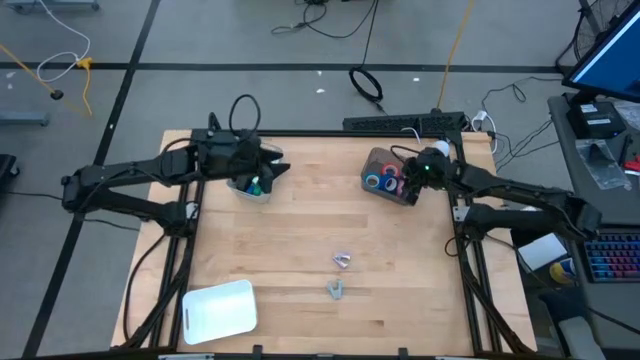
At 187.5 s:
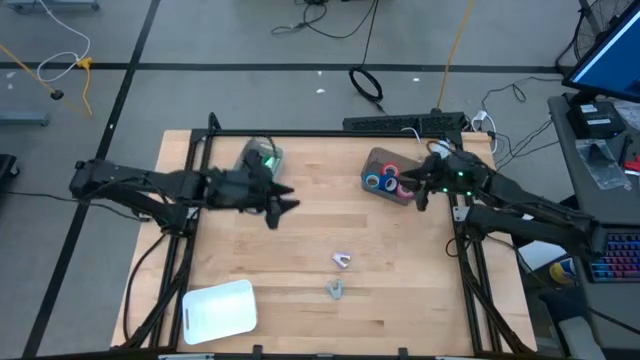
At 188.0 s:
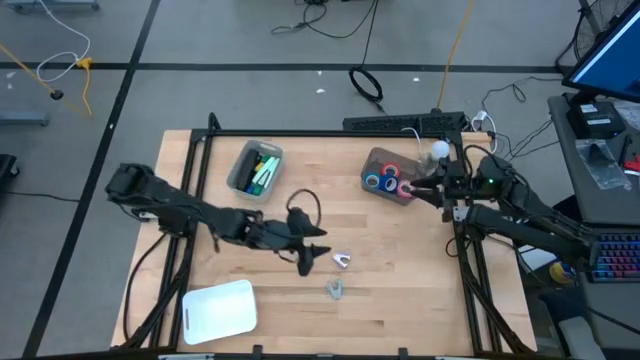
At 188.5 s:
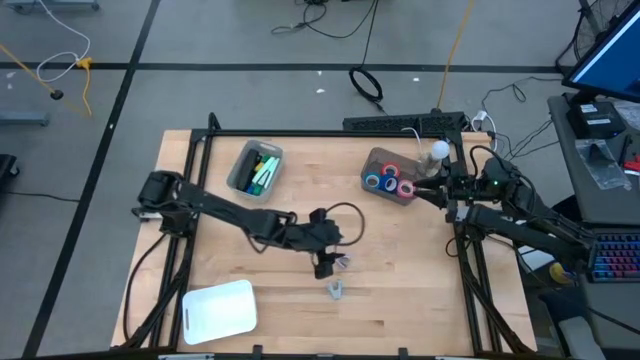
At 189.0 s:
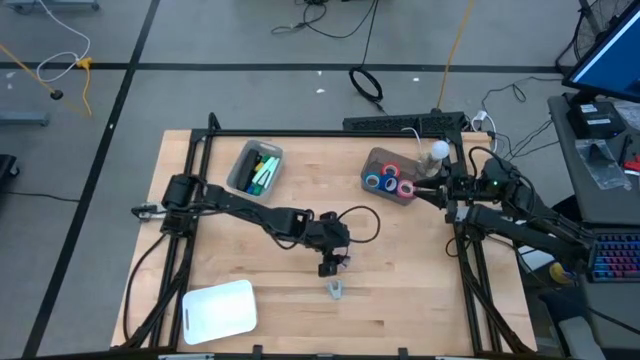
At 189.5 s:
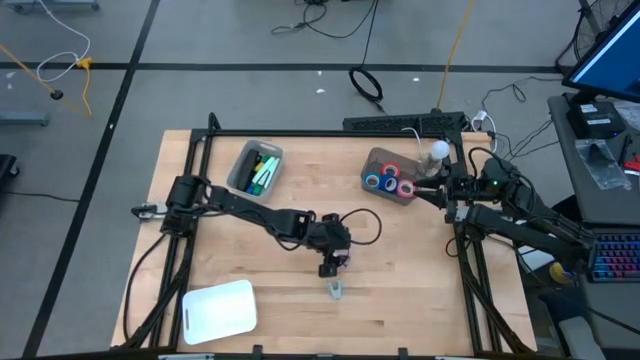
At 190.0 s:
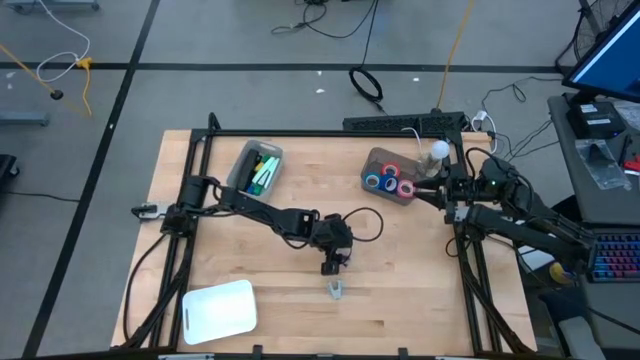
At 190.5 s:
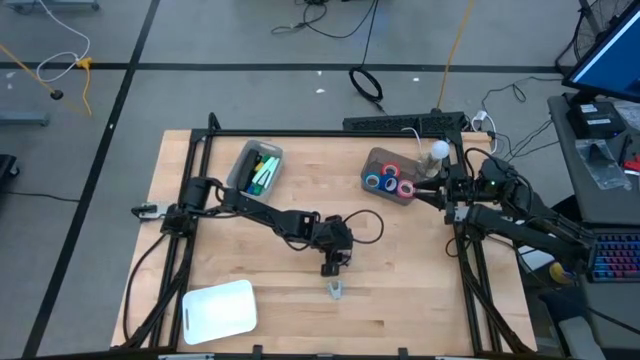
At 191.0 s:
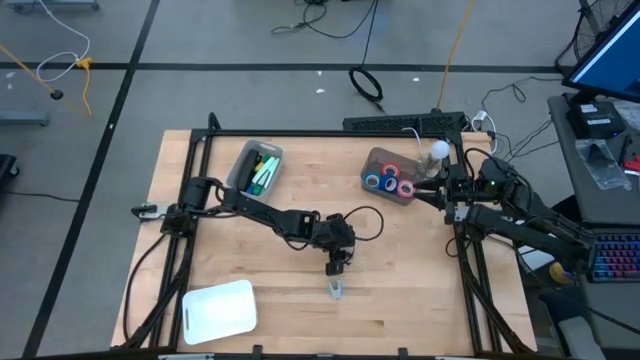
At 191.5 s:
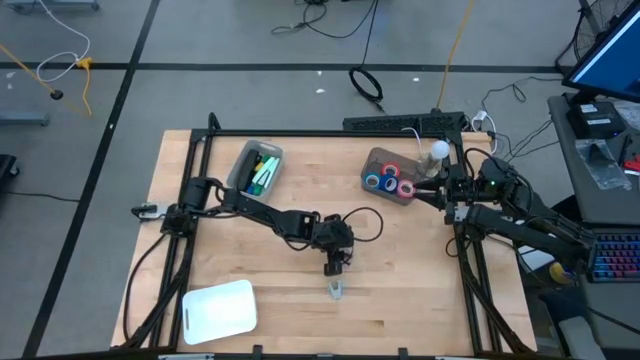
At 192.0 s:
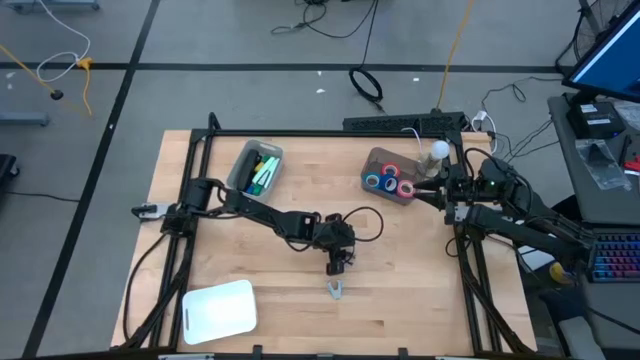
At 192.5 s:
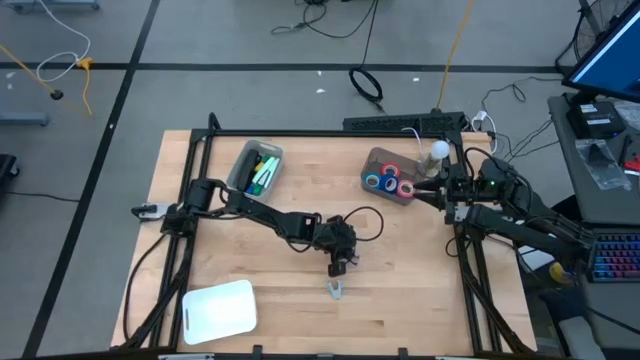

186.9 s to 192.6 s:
Task: Pick and place Stapler, Stapler remover, tape
Put the purple staple remover into the white bin

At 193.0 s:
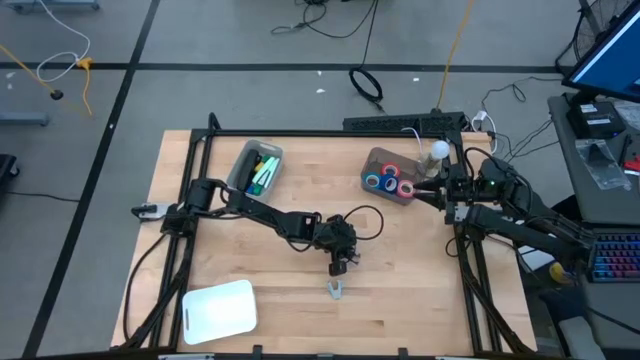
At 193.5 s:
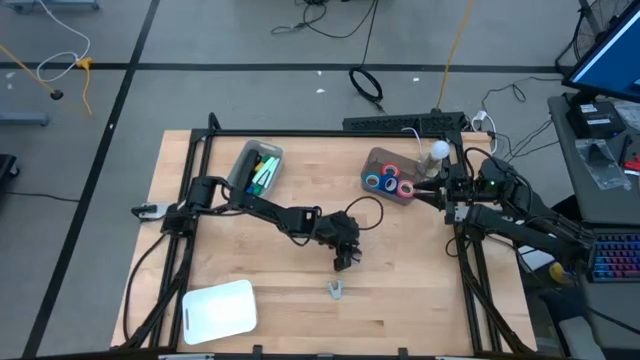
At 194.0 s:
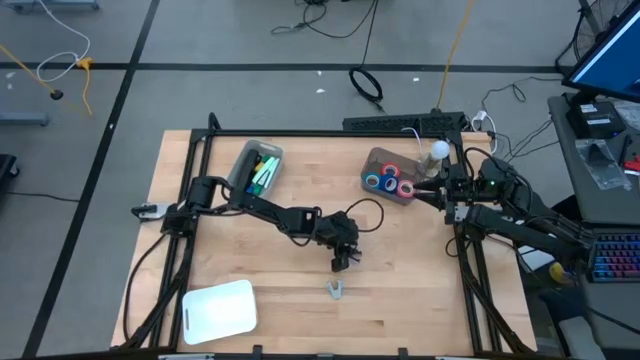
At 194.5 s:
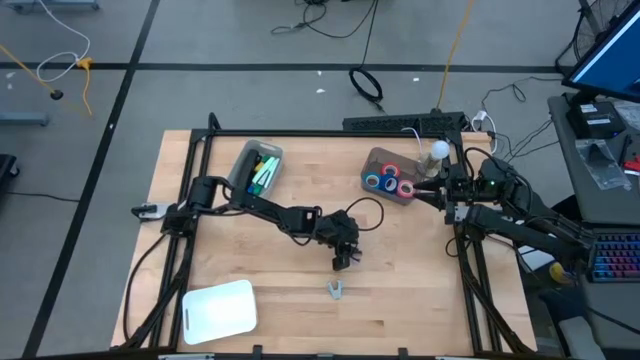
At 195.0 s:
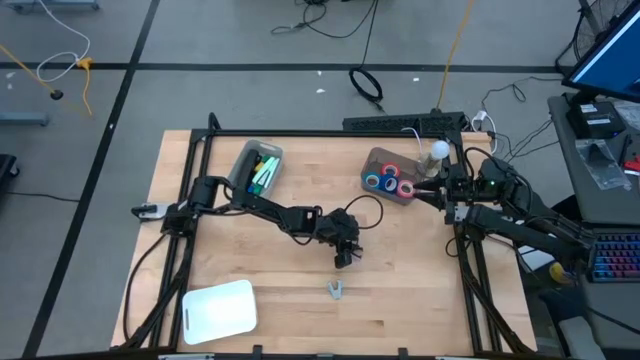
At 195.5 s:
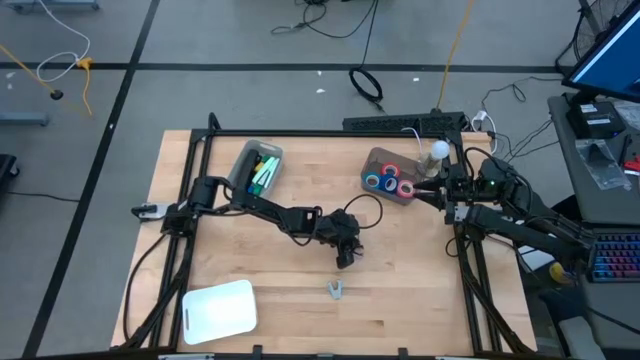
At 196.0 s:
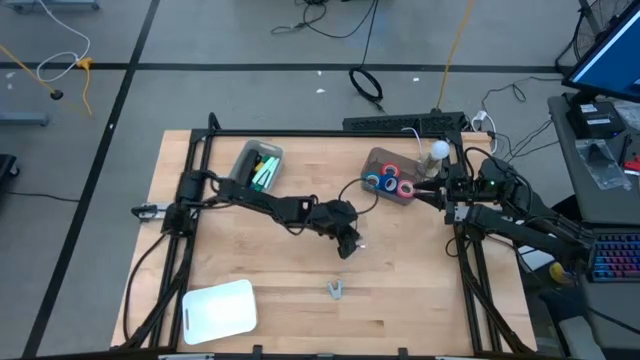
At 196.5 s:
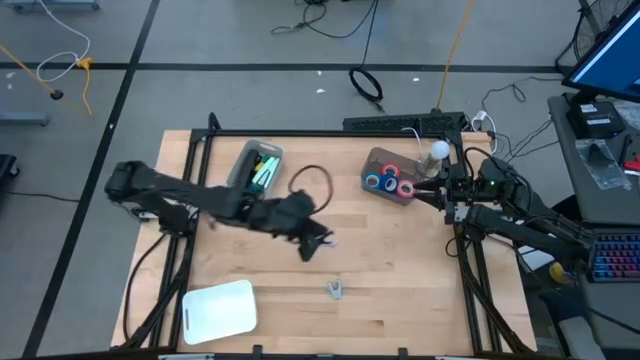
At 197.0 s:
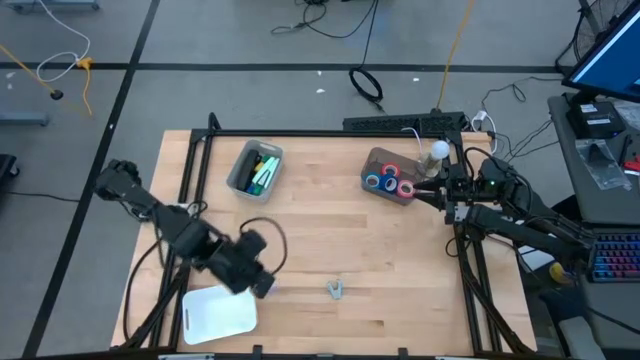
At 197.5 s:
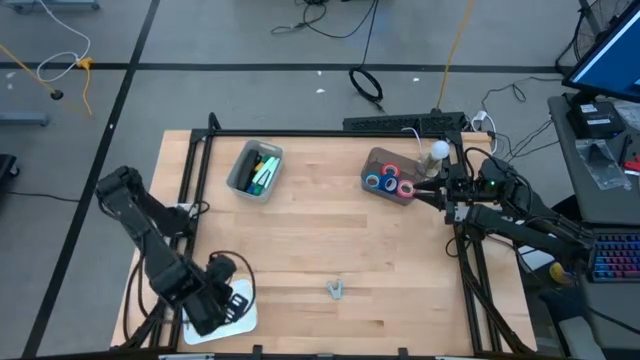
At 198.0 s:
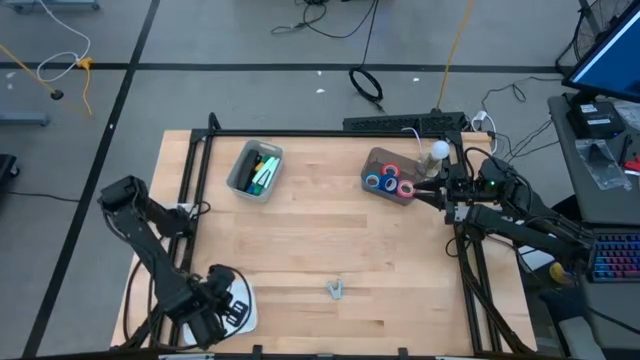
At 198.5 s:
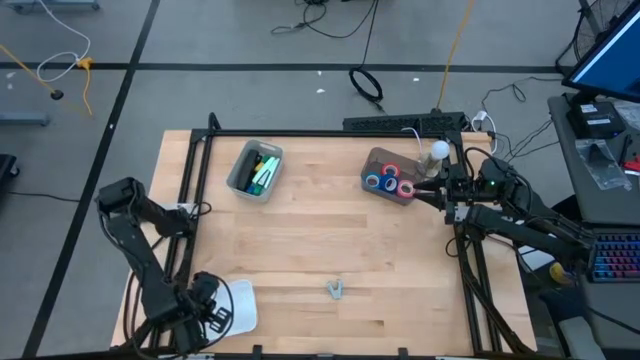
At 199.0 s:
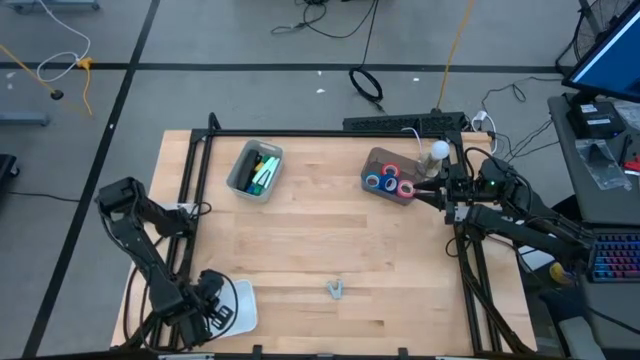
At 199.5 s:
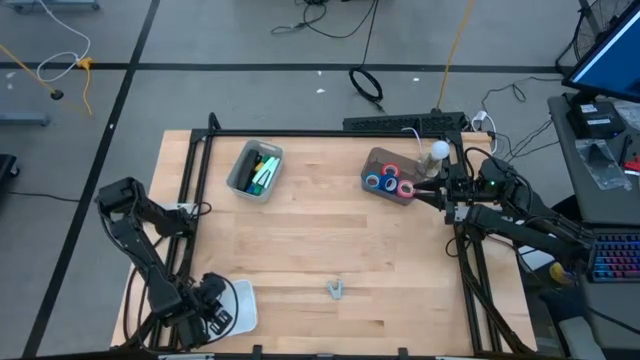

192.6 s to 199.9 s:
Put the purple staple remover into the white bin

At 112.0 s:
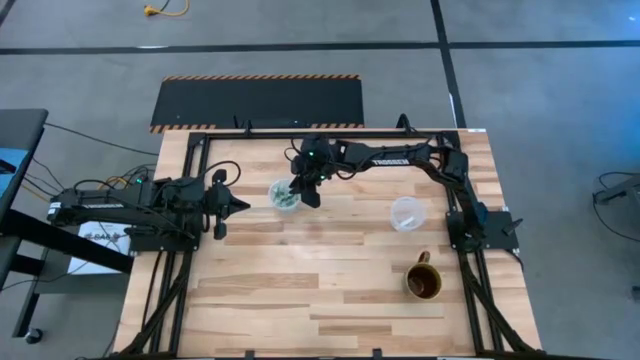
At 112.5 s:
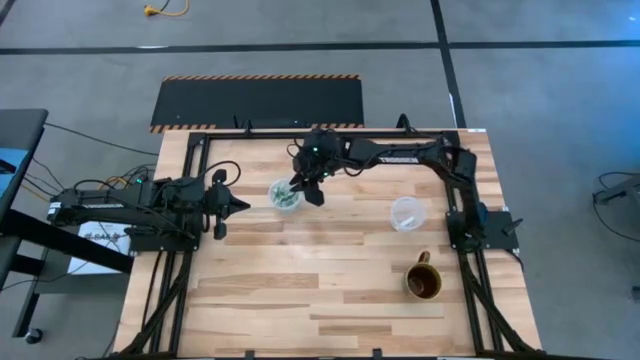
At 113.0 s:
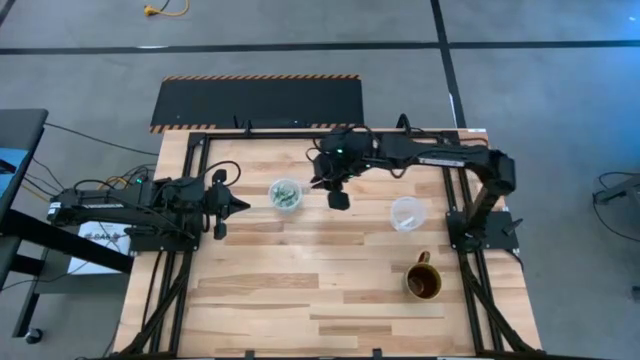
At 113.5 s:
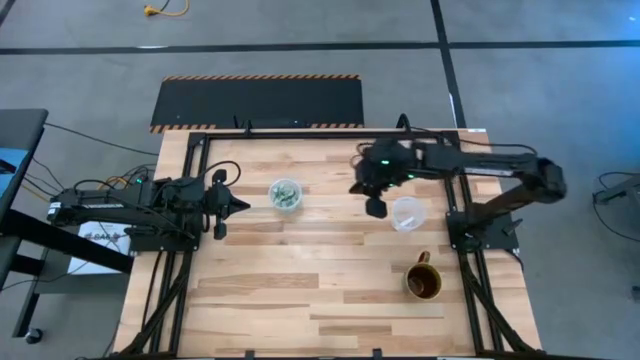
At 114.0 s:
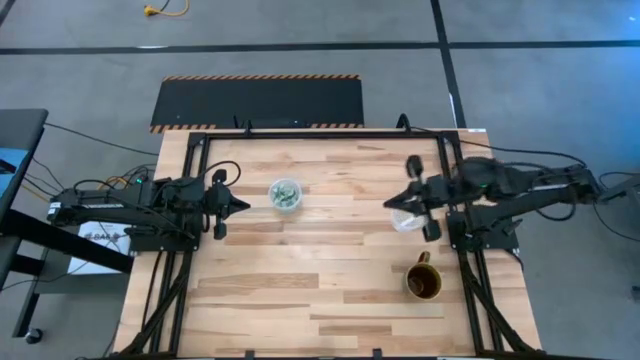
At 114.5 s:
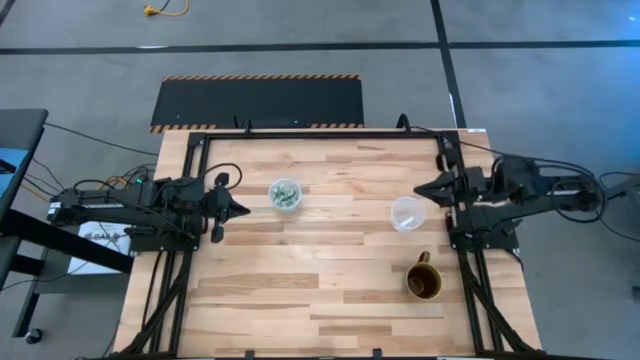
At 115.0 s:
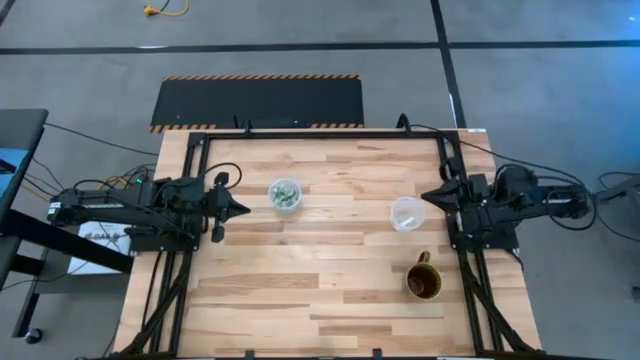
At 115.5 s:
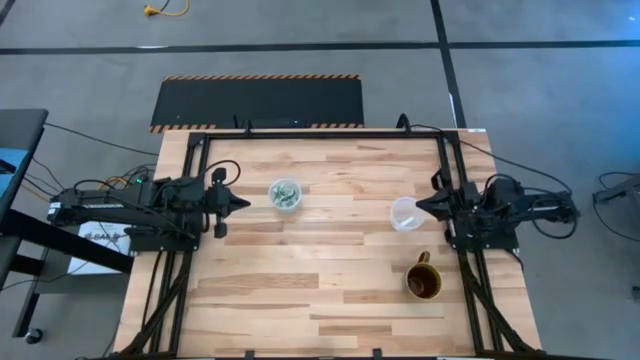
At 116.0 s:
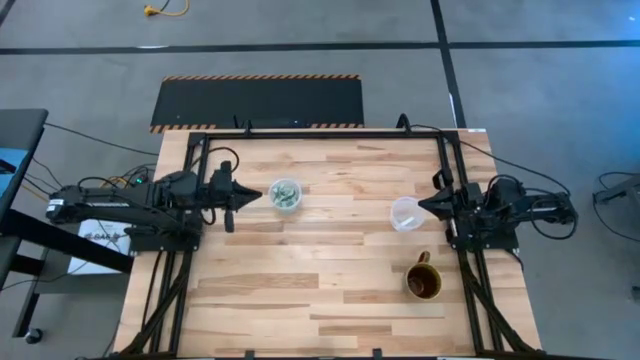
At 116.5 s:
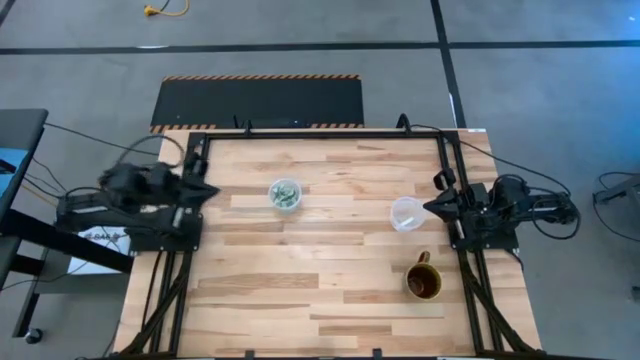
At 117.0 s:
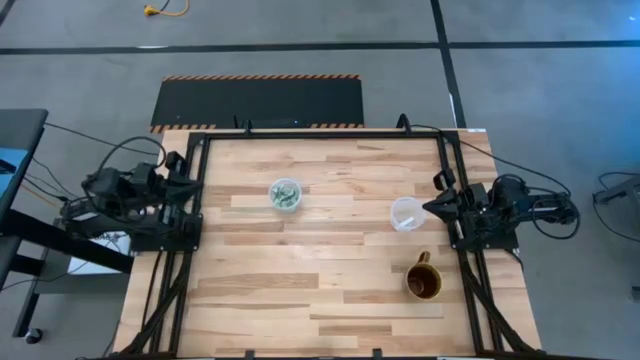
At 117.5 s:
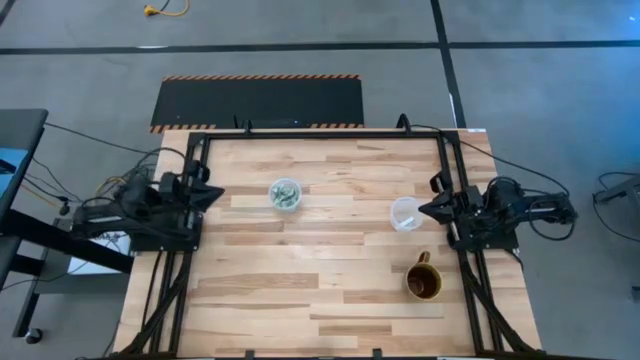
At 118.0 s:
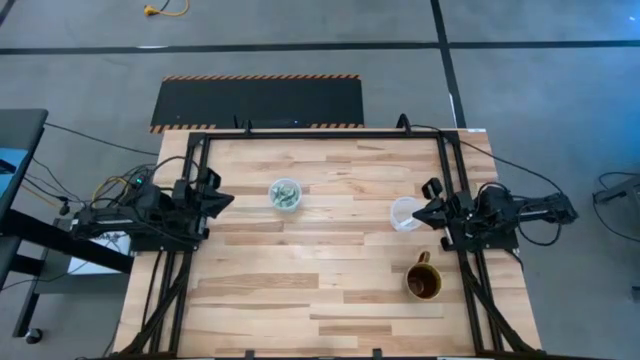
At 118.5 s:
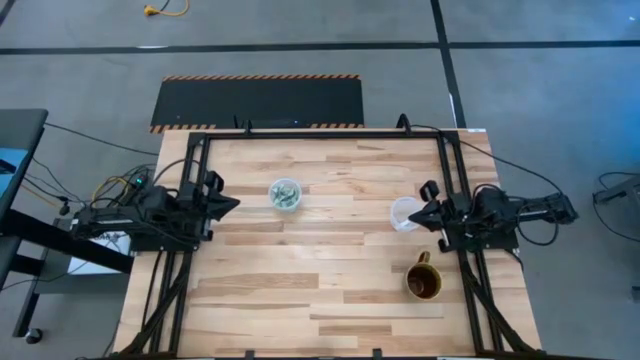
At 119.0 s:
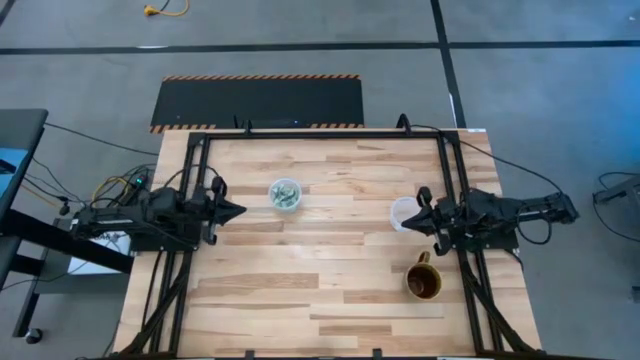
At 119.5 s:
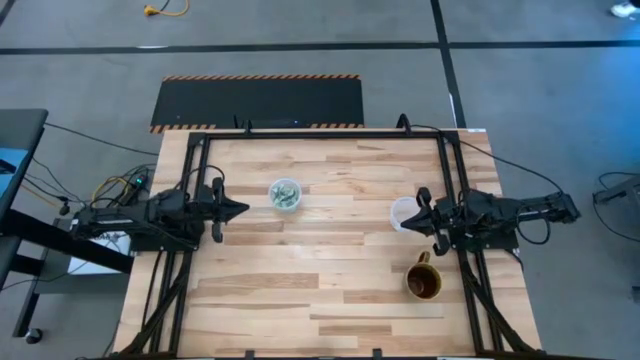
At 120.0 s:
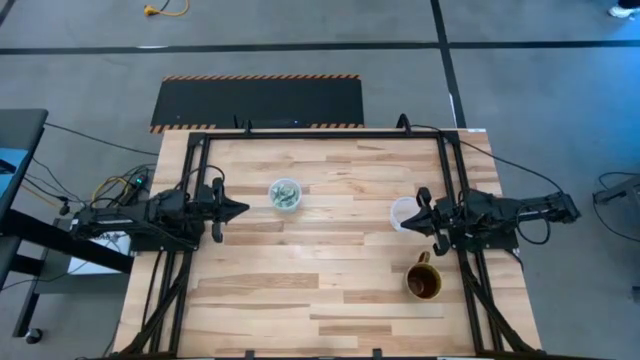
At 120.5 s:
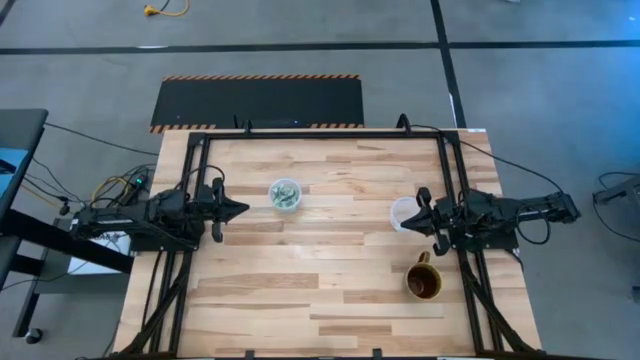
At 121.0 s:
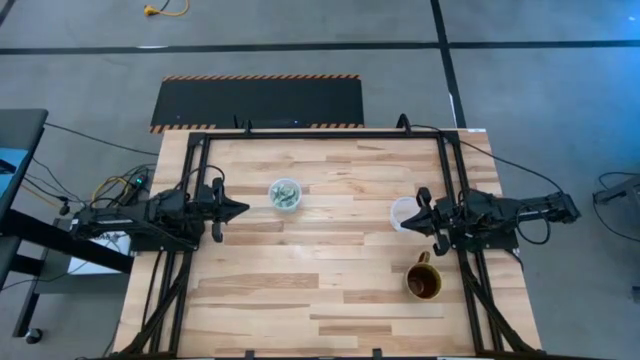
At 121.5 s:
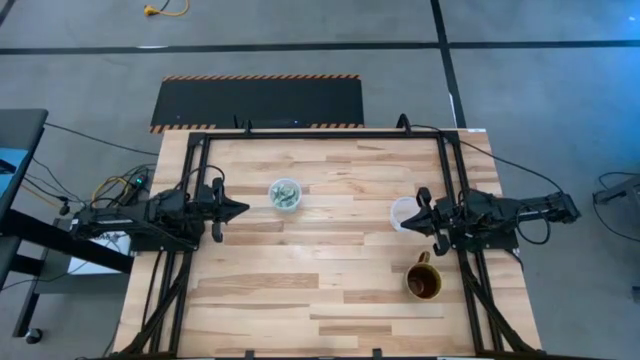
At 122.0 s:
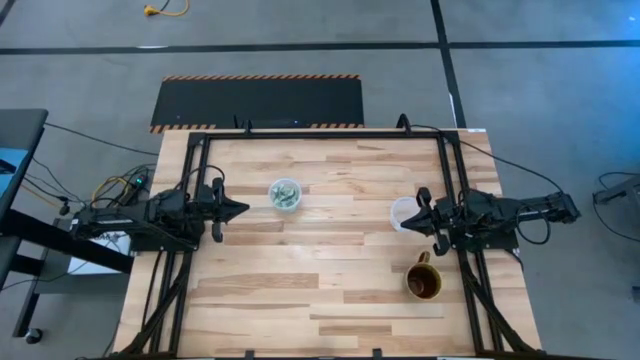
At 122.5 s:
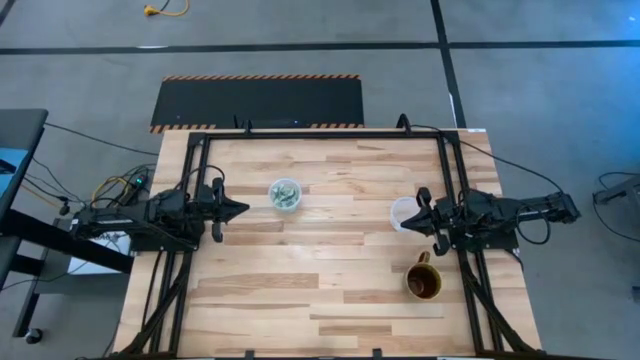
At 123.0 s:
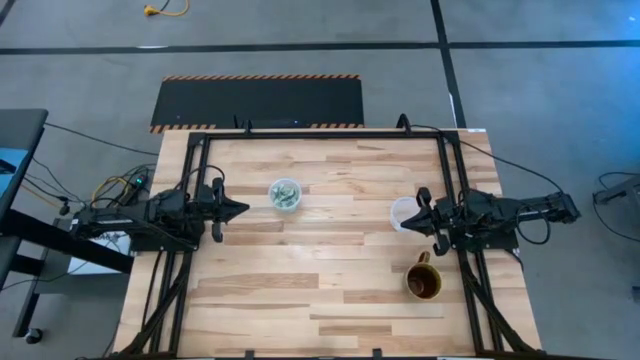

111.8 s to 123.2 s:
Task: Pick and place Stevia / Truvia into bins
Return to Home Position
